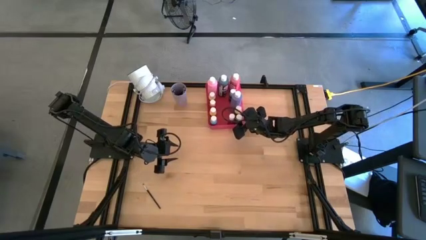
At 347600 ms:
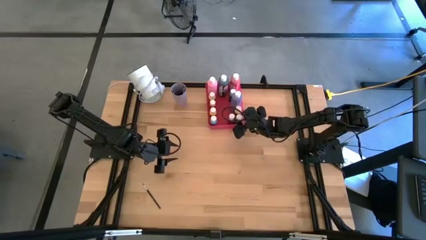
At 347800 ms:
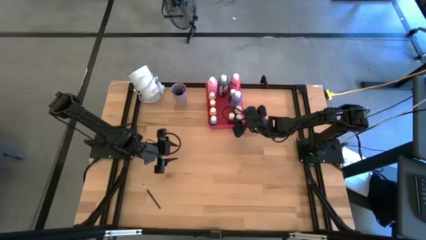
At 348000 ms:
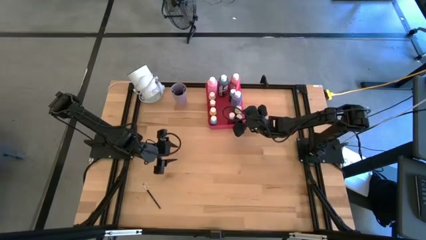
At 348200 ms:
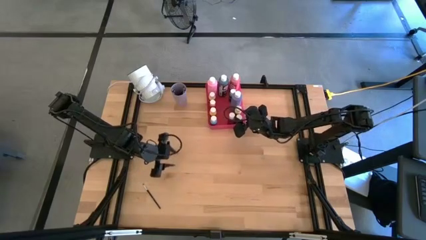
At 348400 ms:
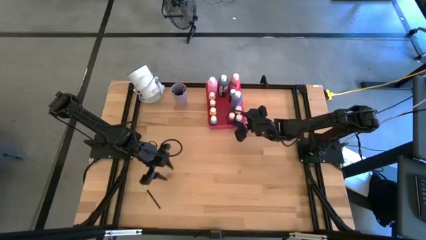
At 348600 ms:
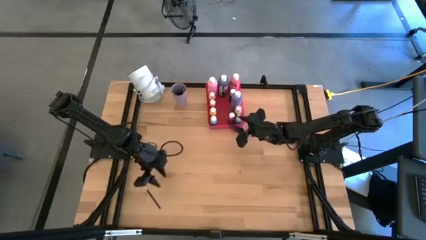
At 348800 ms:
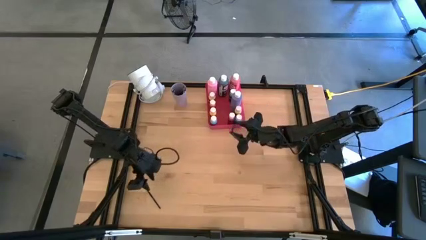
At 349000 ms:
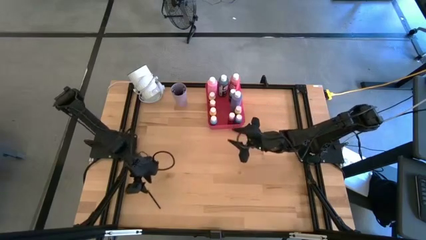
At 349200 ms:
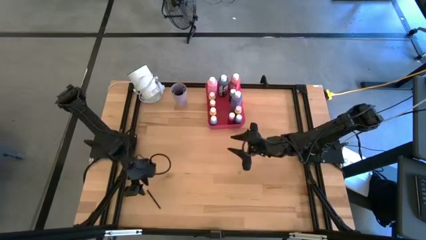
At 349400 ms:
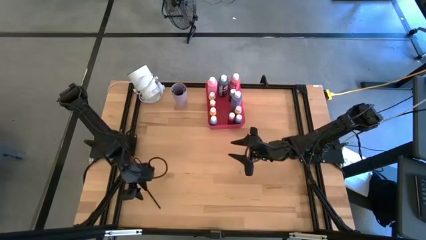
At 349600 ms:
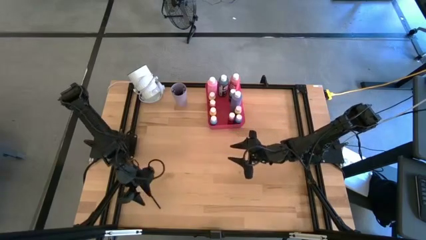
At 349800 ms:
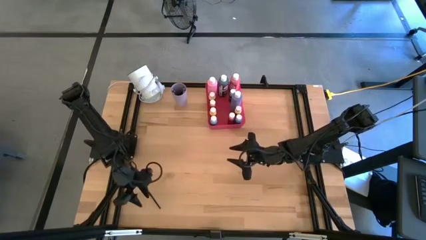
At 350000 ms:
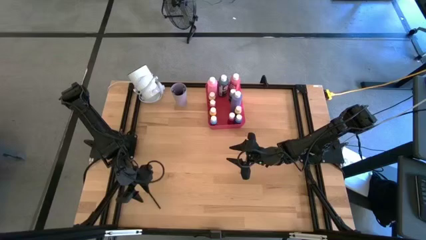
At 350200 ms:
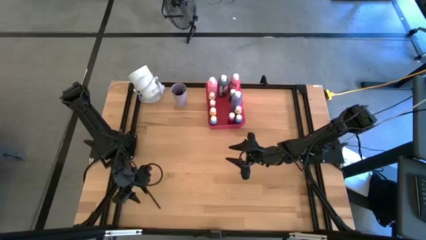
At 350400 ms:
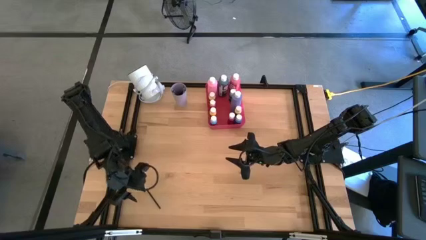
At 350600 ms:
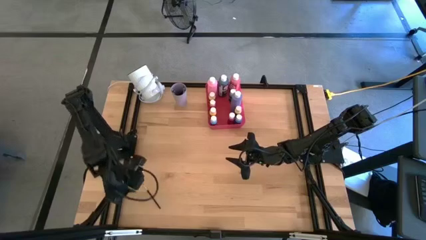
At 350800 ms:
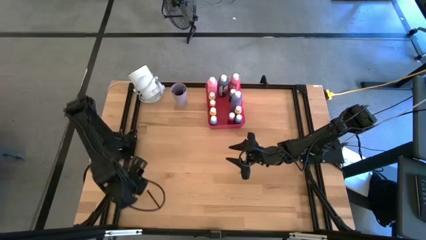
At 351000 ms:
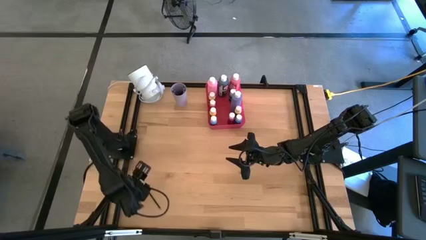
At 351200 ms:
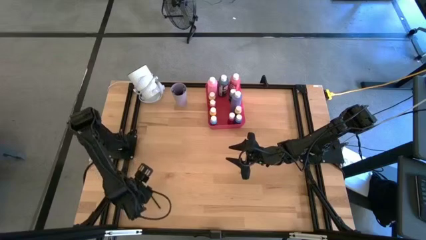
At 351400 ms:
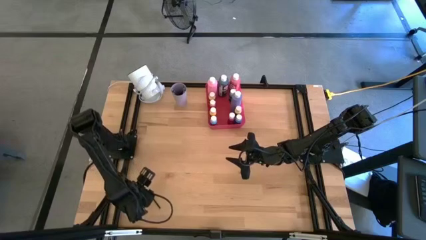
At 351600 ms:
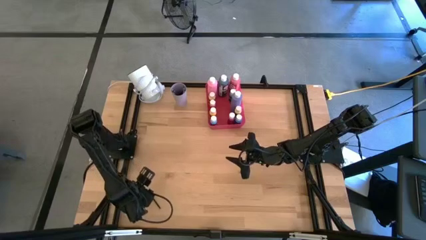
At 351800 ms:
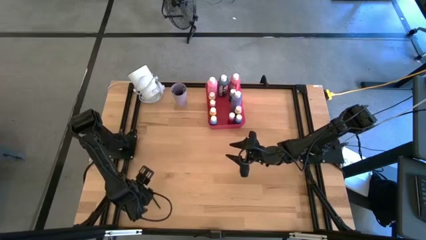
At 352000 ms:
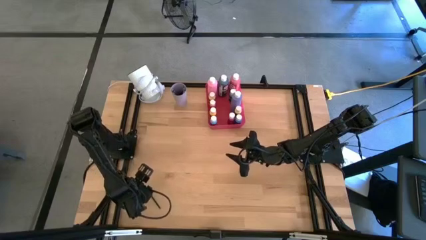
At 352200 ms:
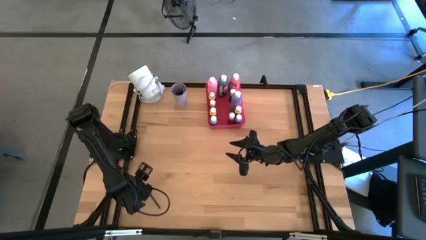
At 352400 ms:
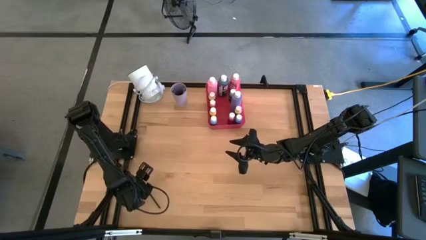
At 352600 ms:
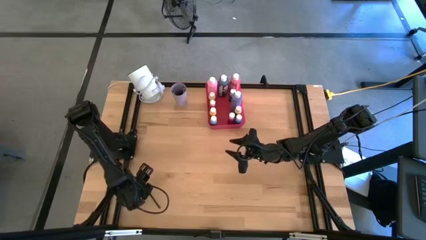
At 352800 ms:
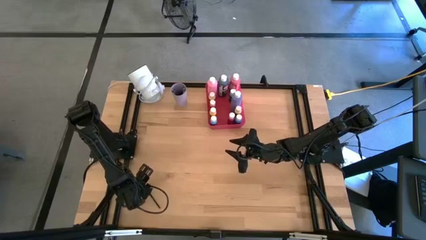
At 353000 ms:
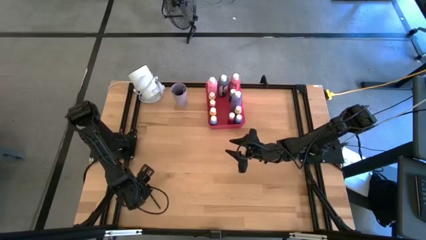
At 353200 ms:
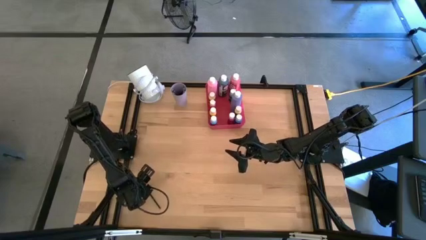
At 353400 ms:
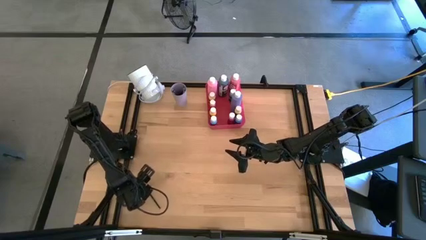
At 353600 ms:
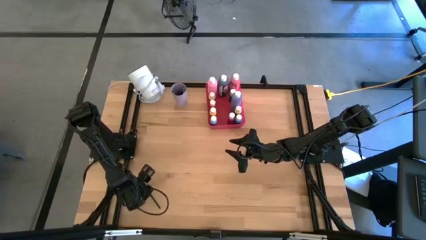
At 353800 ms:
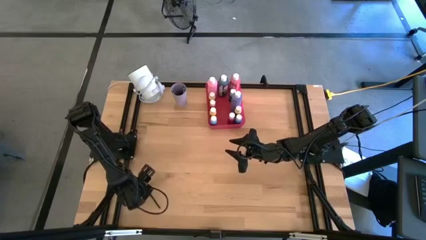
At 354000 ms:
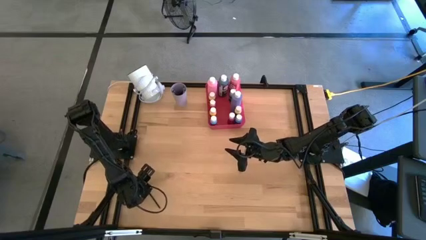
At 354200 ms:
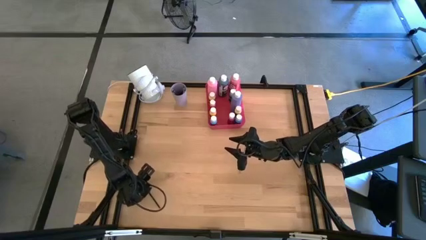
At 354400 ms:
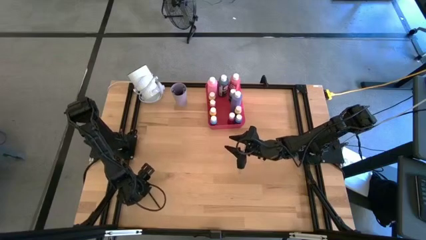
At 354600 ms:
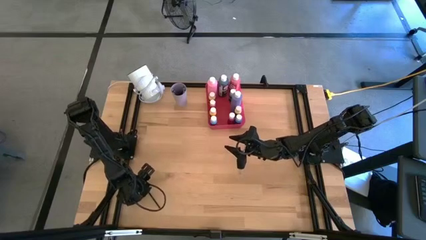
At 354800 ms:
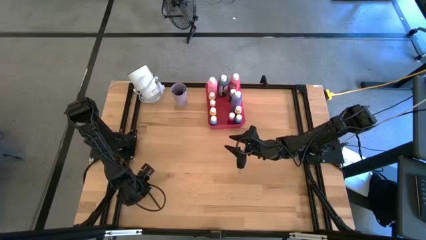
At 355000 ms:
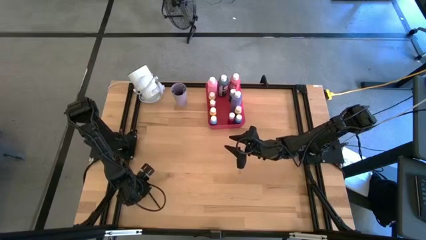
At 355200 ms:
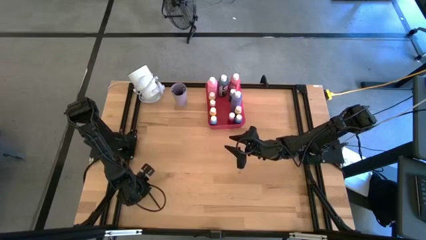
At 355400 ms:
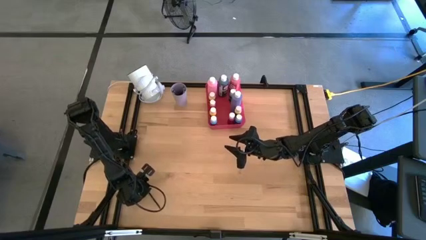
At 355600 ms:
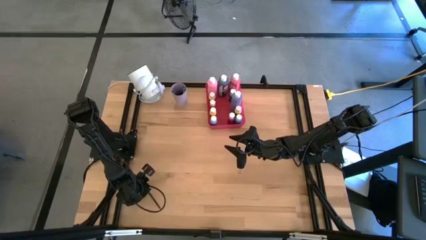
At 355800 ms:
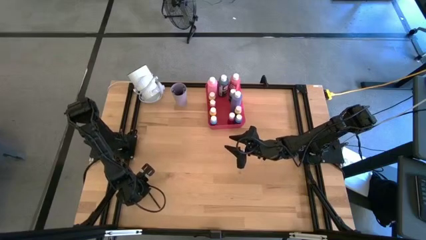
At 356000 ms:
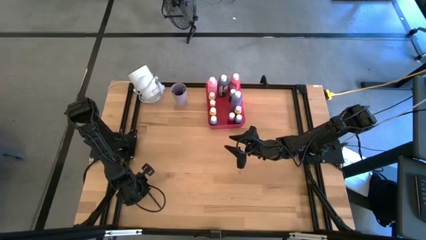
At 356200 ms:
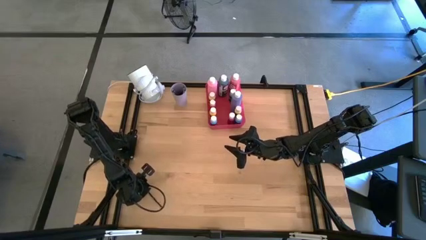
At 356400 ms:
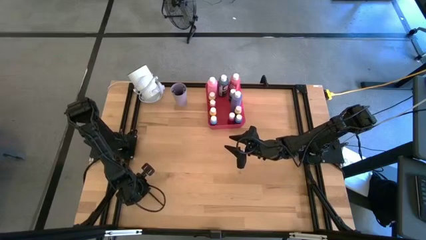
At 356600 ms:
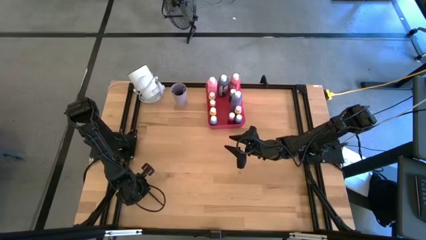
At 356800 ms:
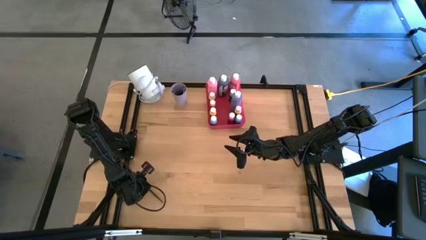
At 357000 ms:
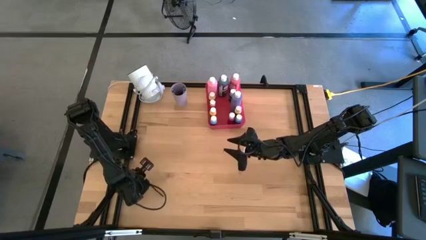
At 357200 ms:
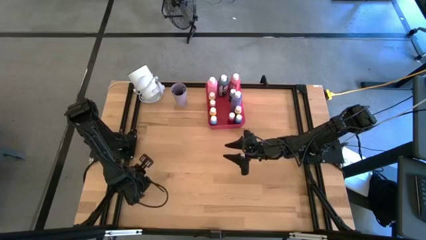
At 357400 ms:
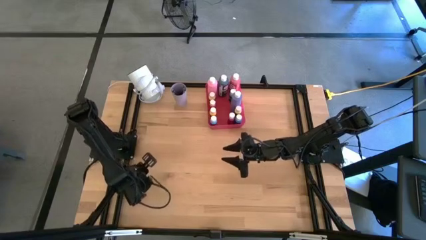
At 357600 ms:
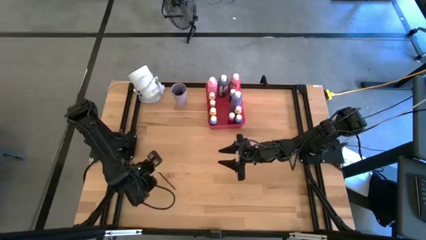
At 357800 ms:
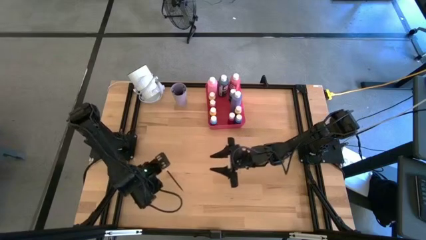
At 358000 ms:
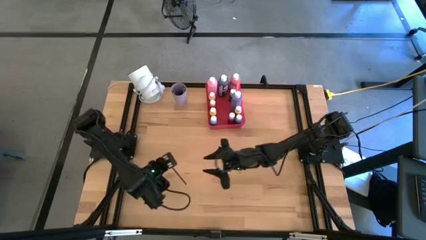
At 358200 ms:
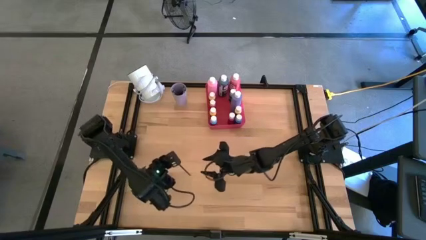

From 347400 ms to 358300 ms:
Task: Pick & Place Paint Supplies
Put the black paint brush into the purple cup

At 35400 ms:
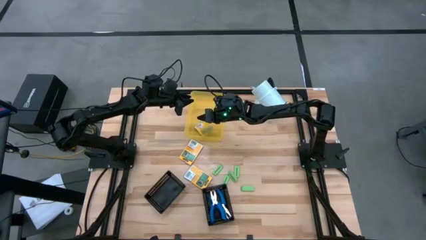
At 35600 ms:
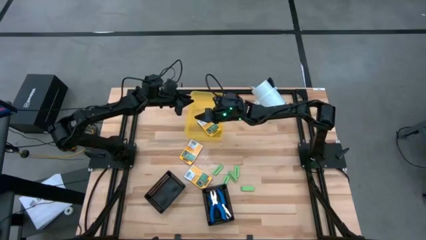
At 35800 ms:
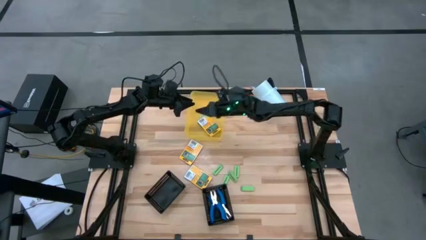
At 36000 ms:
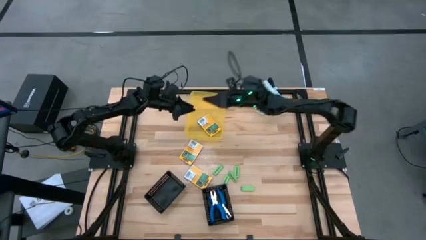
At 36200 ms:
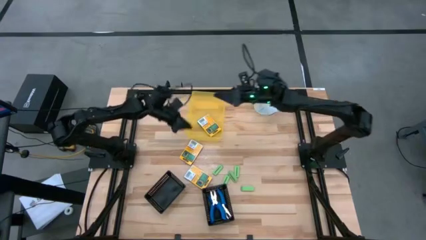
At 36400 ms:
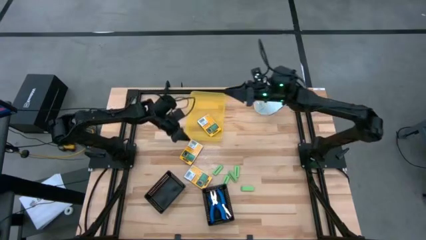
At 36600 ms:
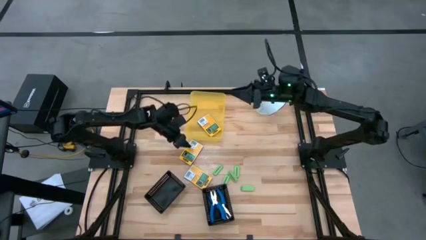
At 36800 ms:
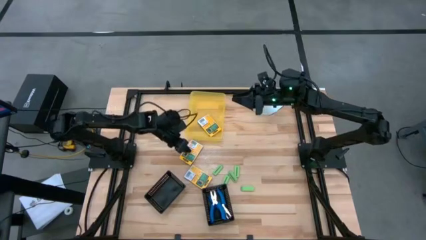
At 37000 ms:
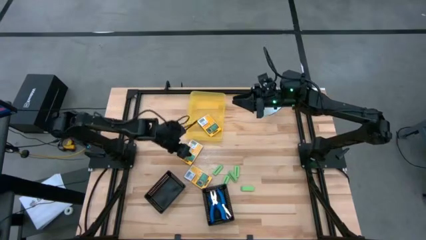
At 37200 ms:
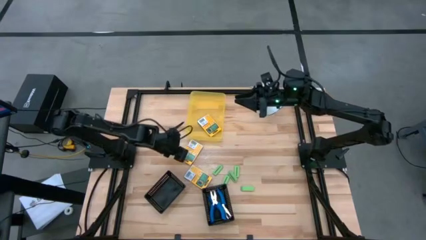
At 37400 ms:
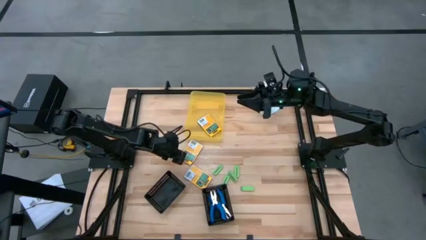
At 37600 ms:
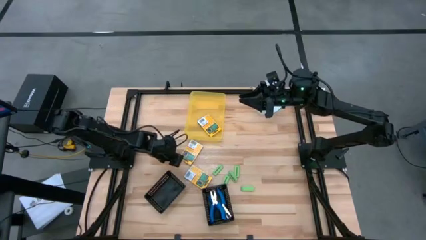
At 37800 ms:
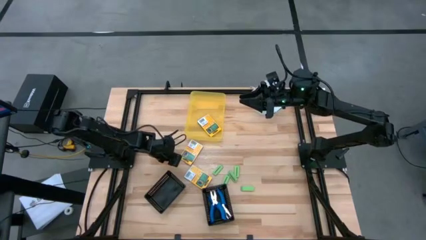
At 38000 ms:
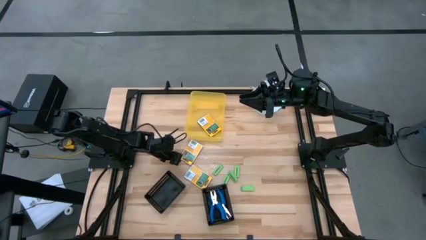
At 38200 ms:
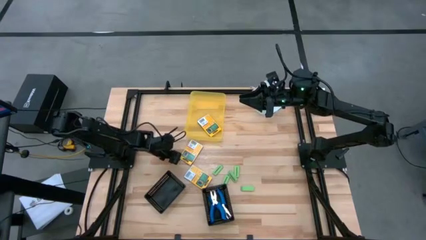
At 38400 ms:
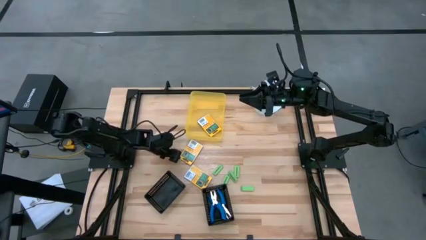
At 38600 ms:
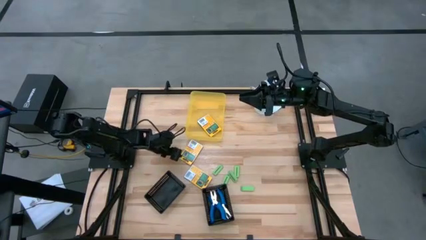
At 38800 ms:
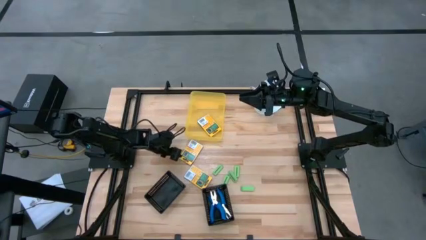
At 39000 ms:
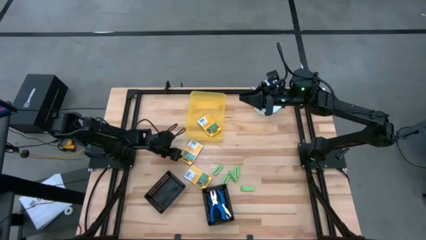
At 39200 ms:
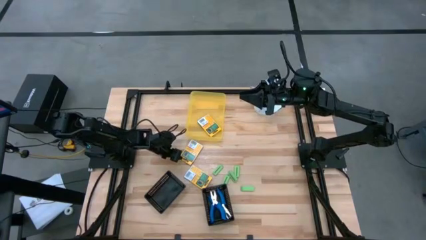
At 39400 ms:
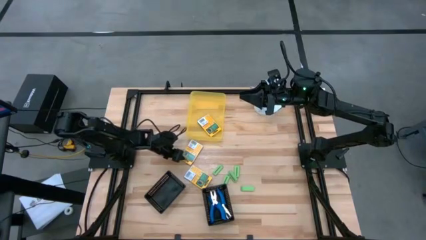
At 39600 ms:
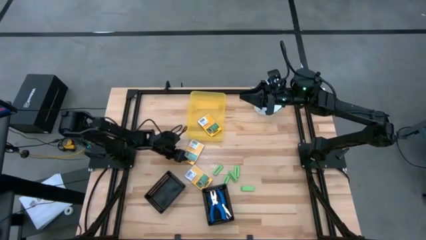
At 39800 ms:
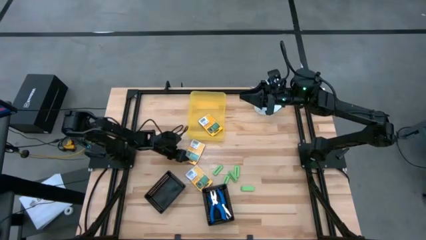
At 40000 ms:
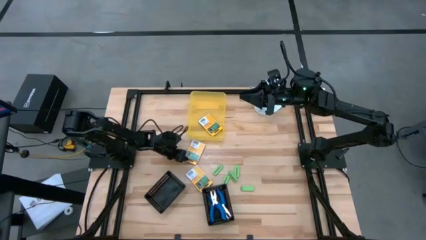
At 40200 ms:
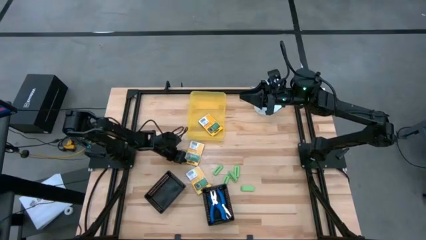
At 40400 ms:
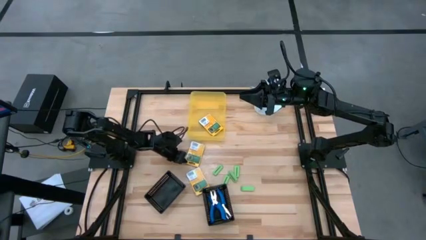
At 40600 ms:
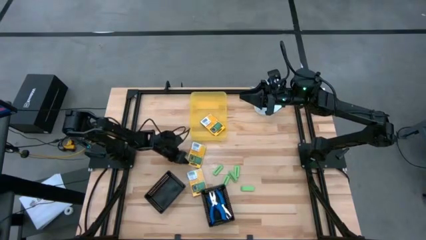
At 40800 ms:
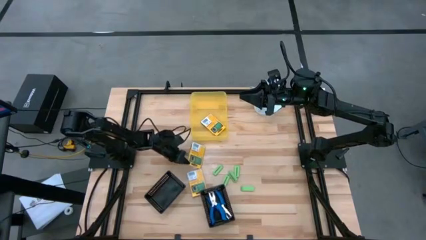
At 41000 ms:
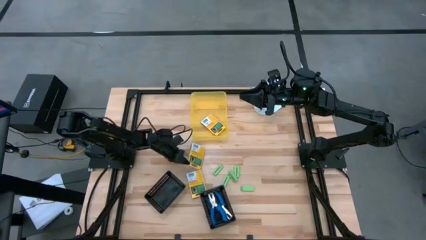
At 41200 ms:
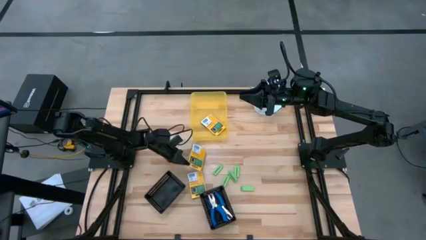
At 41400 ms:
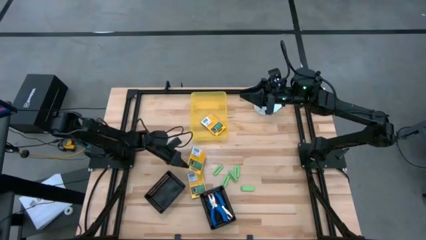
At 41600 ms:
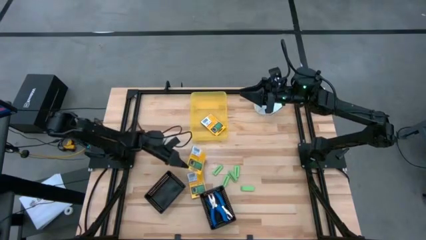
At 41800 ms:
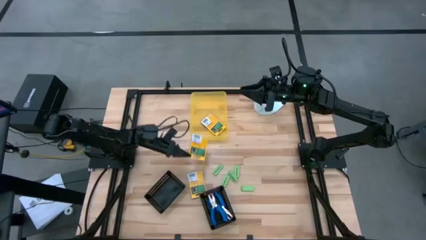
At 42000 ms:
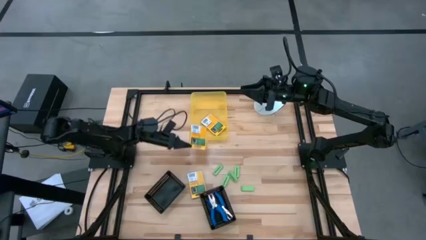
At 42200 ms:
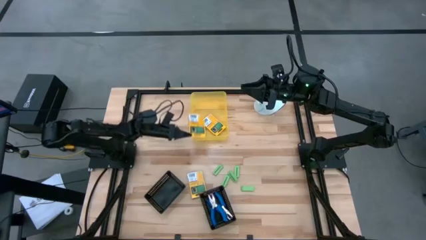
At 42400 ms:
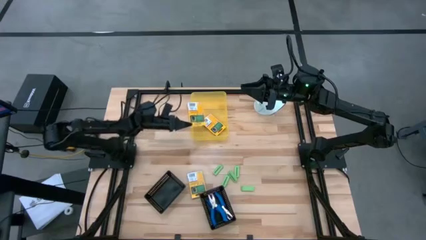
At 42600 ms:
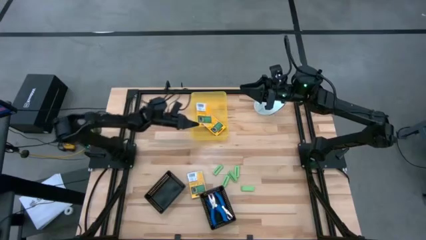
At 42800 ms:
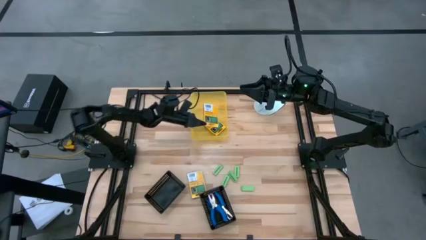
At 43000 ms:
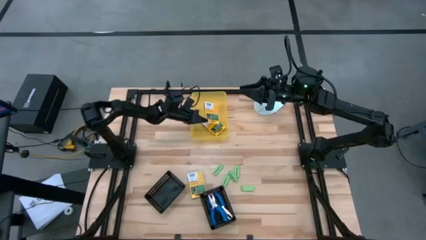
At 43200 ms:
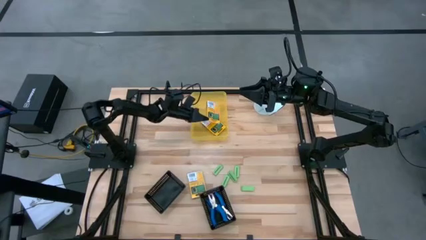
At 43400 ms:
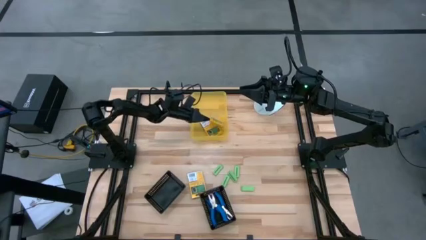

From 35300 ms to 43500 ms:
Task: Pick & Place School Supplies
Put the box of crayon into the yellow bin
